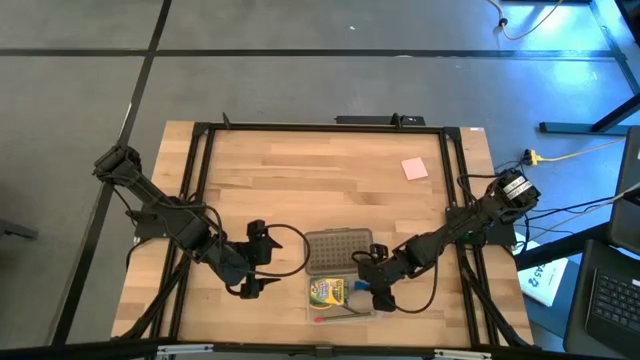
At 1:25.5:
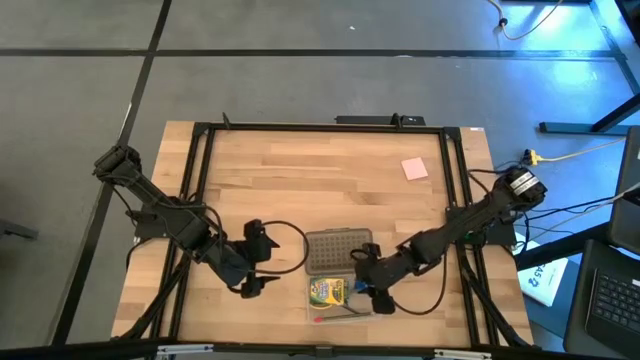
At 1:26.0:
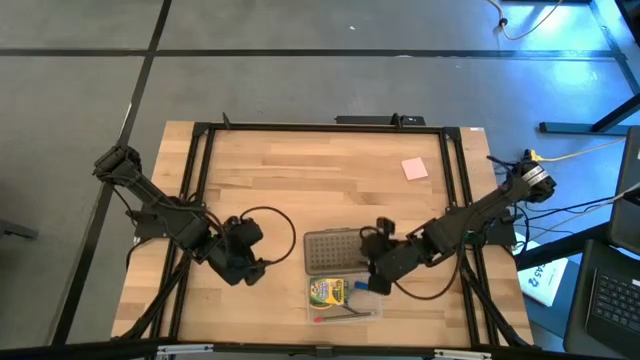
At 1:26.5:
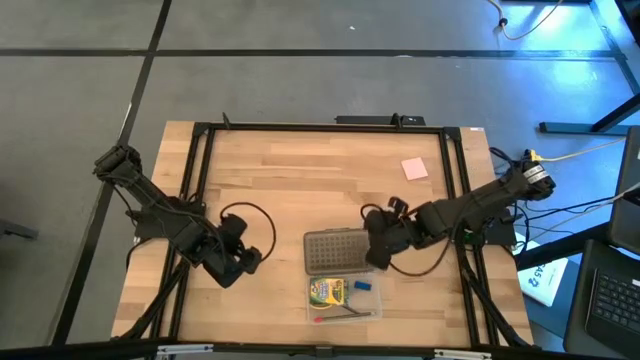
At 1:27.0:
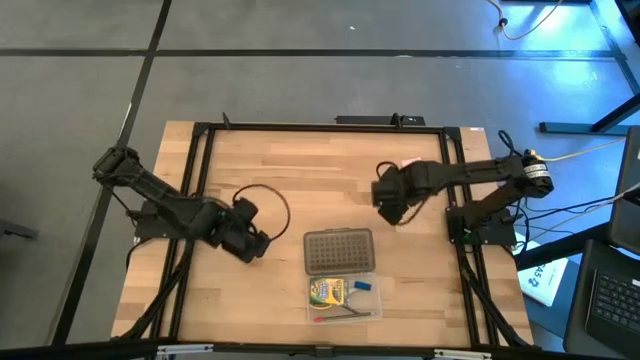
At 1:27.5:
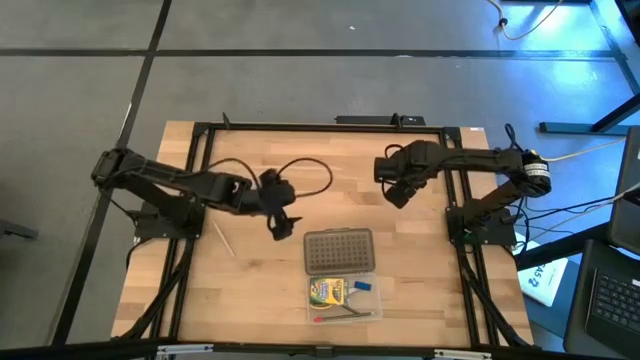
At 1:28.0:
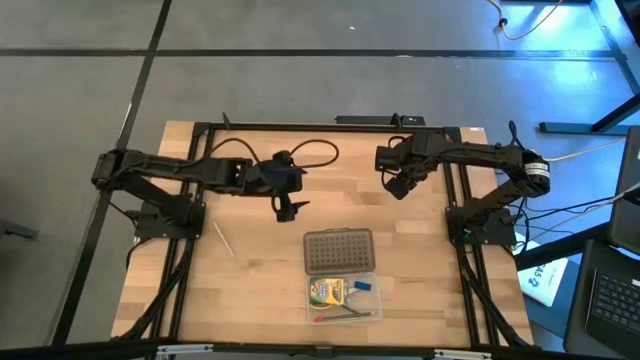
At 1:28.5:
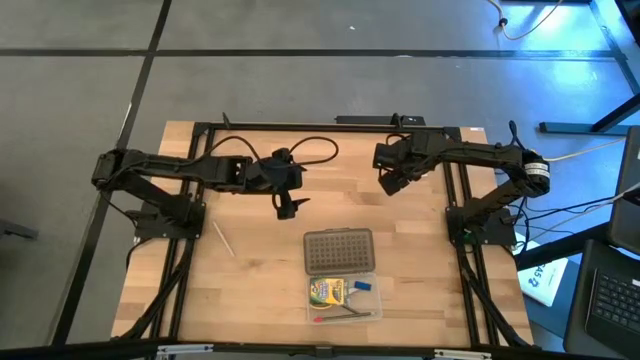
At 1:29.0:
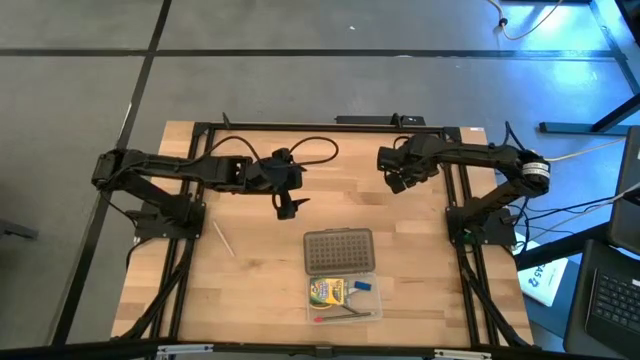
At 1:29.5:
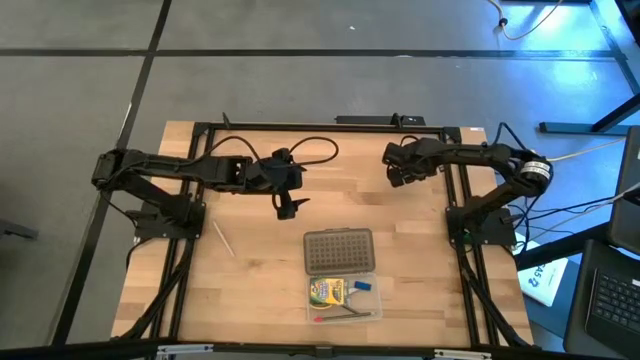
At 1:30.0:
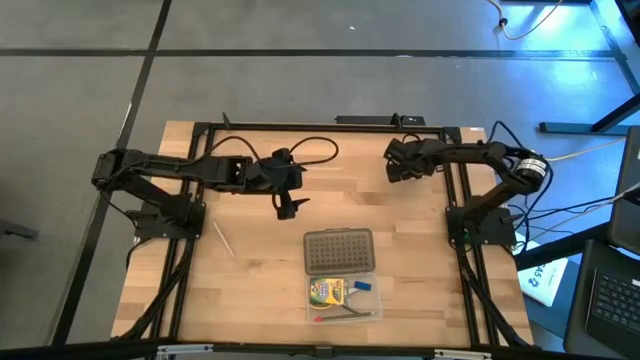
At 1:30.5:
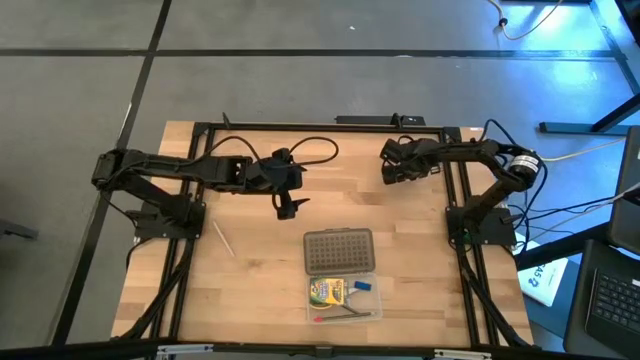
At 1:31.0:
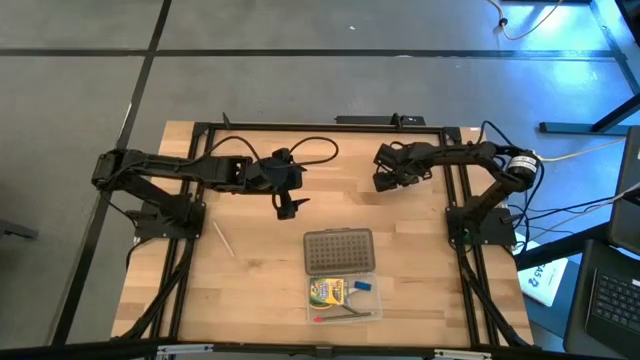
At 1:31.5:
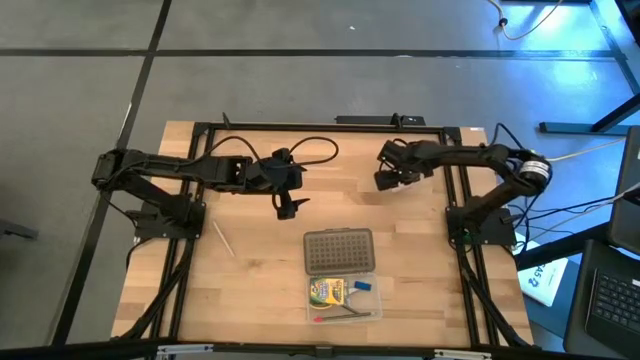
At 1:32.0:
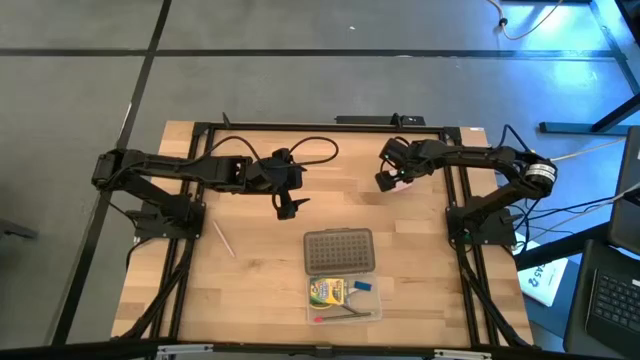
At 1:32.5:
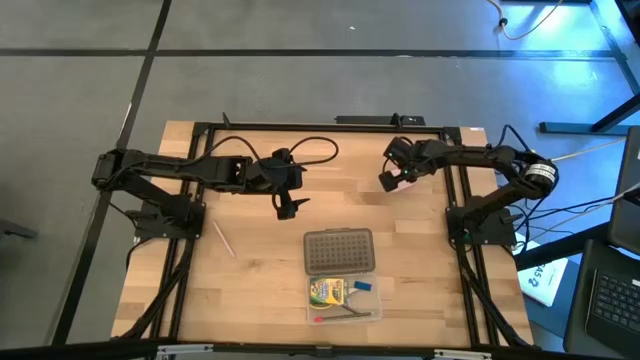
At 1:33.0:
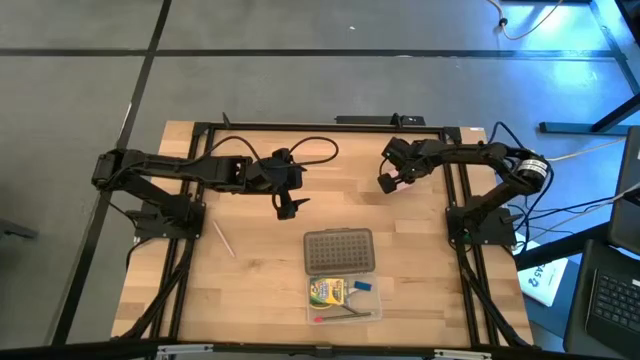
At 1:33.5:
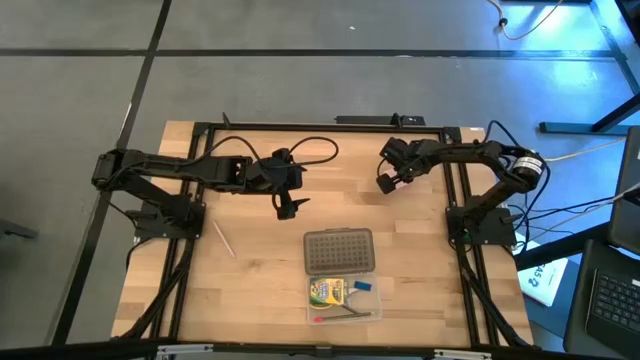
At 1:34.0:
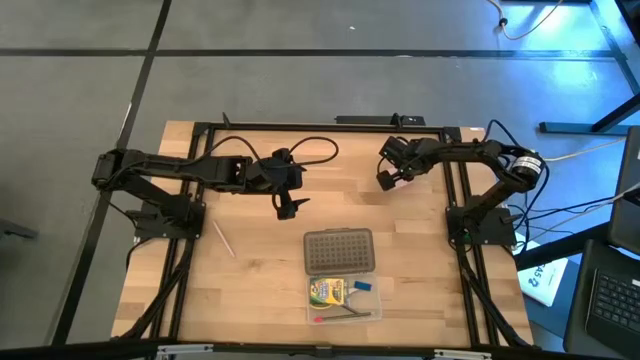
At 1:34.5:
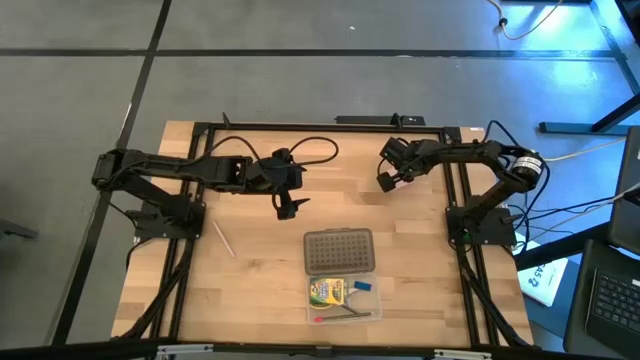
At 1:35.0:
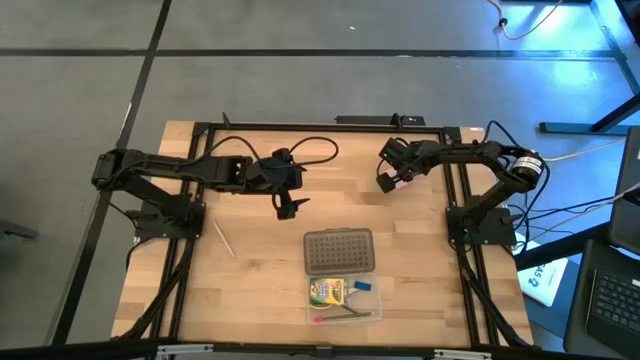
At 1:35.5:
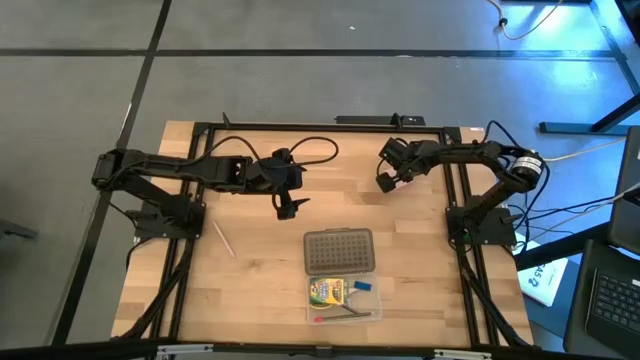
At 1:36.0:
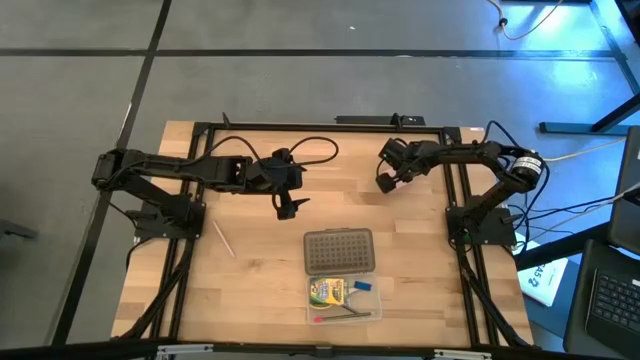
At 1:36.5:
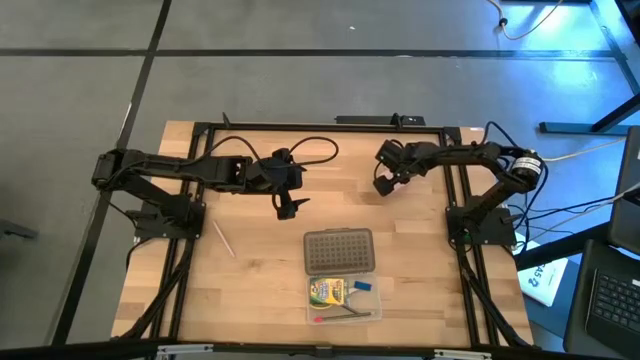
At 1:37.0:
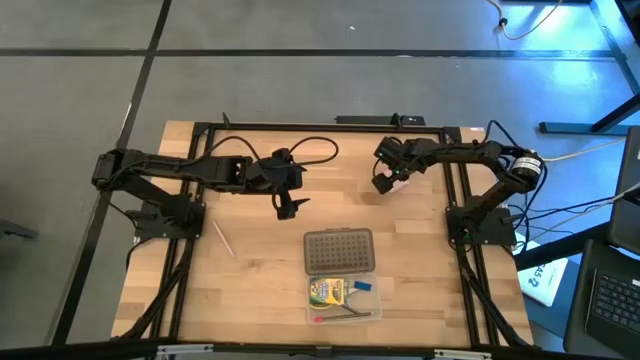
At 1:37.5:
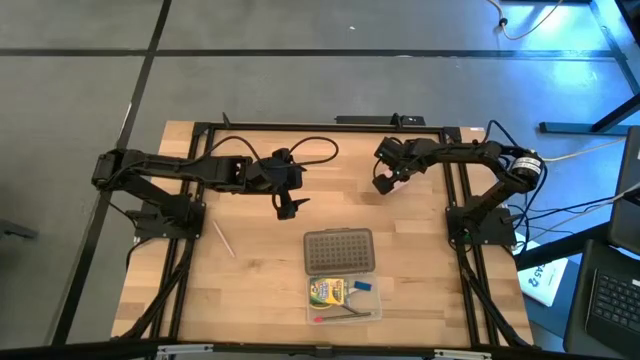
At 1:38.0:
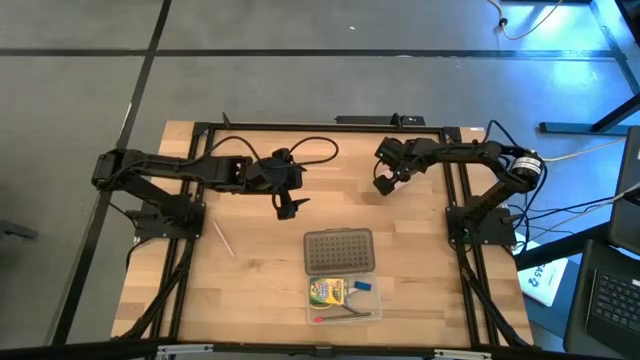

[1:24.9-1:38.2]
Task: Pack school essentials
Put the pink sticky note into the supply box

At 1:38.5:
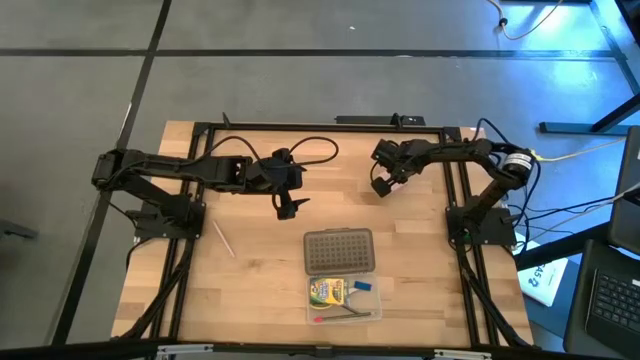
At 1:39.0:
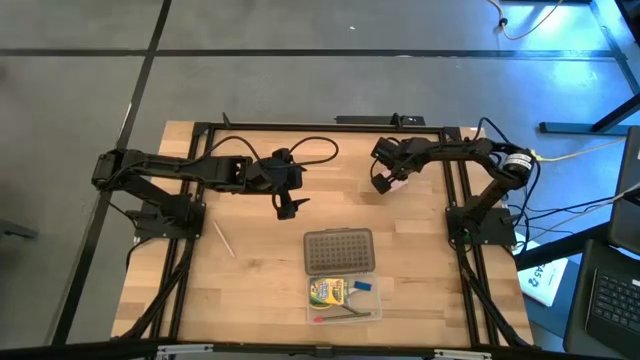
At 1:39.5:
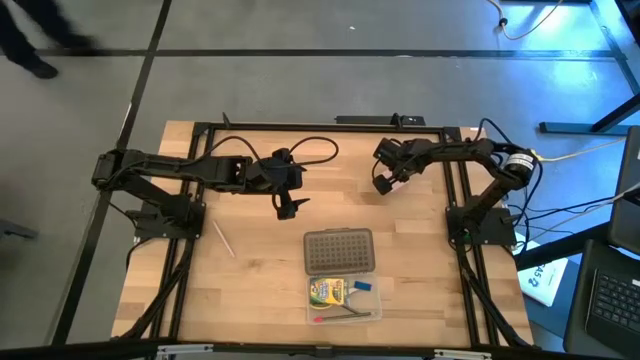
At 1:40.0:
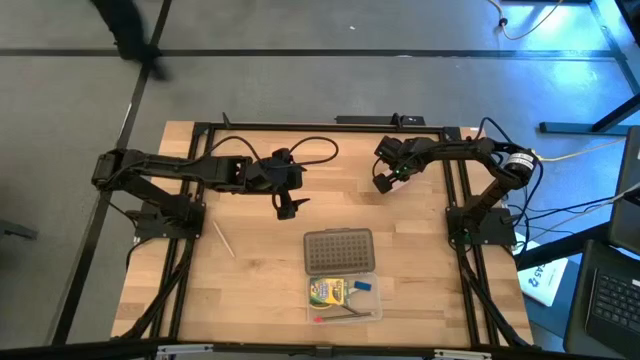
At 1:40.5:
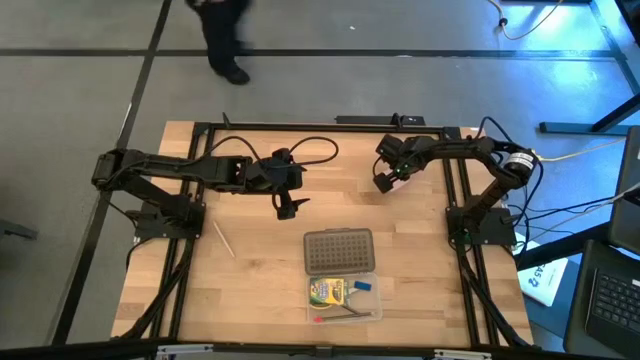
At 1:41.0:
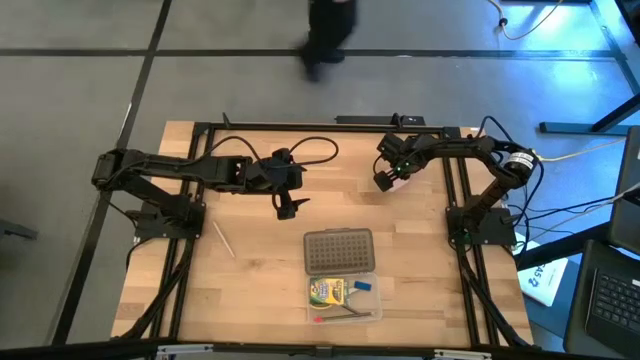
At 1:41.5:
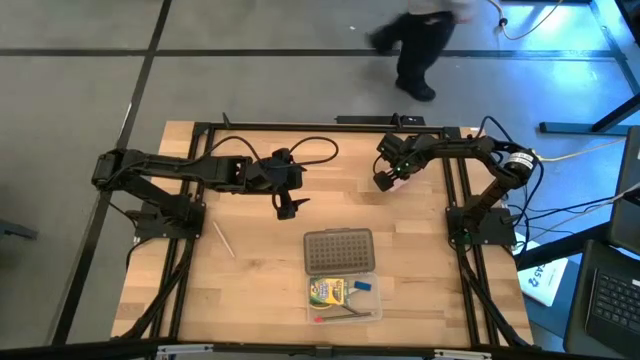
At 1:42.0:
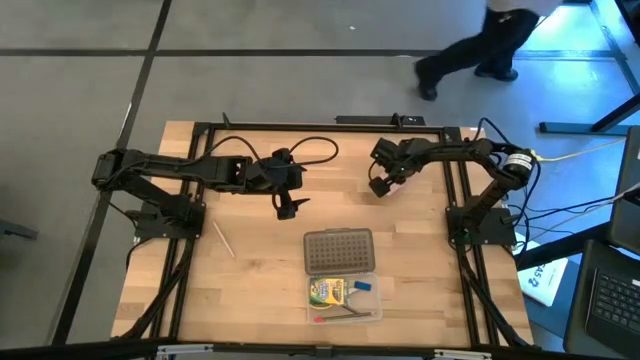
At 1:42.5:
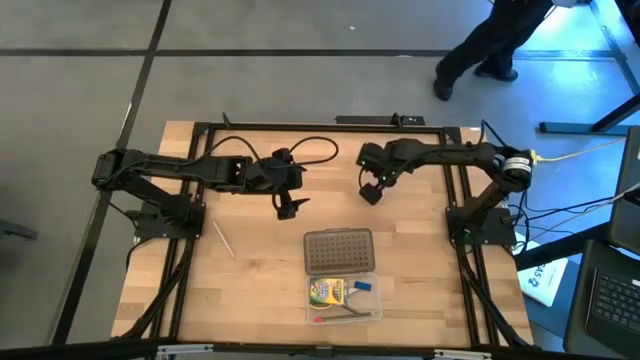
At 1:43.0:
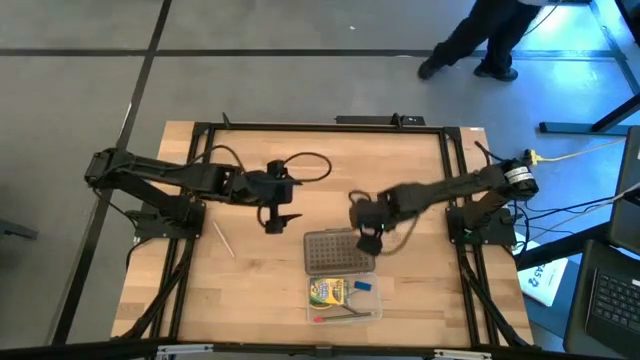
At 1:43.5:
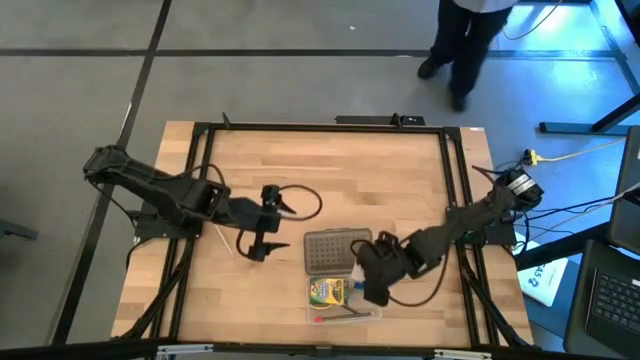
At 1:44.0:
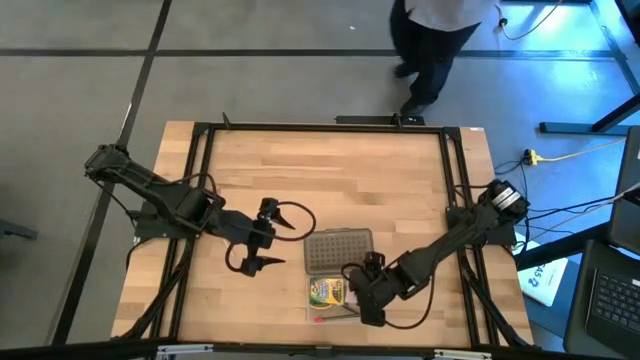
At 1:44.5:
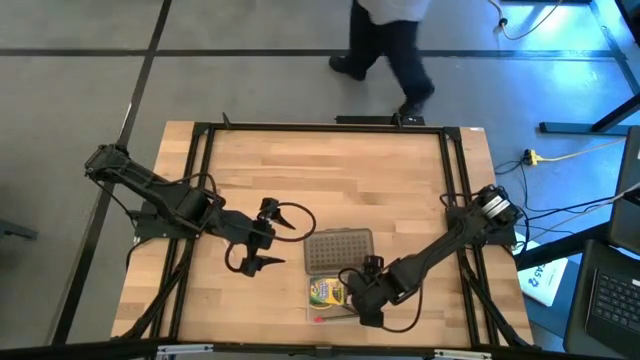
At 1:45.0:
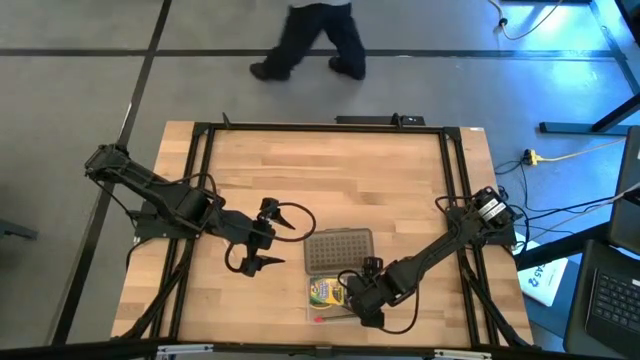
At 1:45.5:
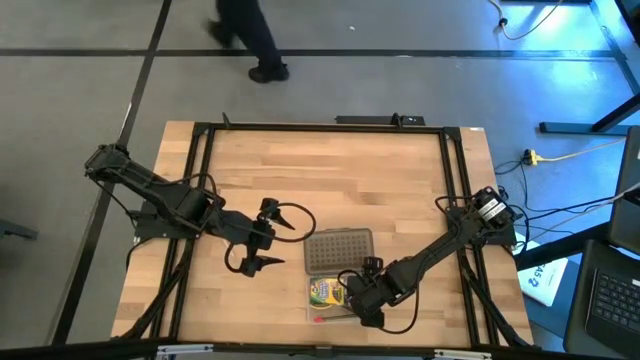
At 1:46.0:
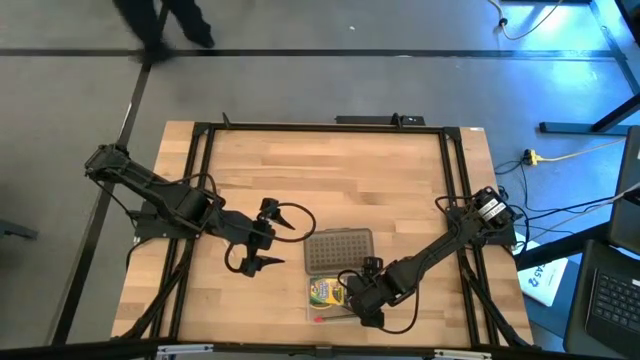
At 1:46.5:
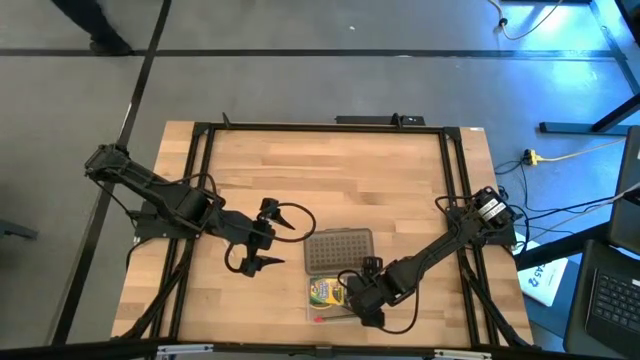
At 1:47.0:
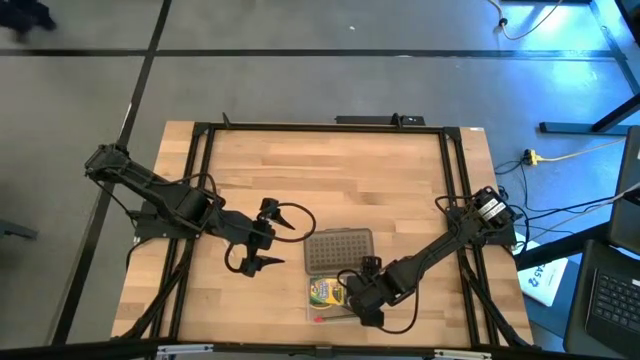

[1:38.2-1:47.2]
Put the pink sticky note into the supply box
